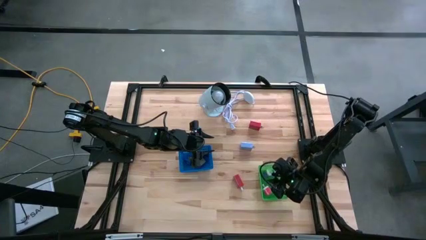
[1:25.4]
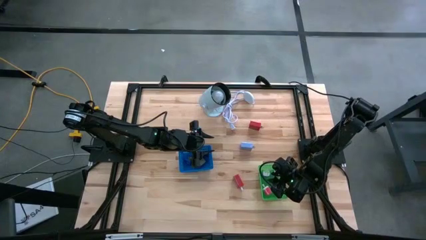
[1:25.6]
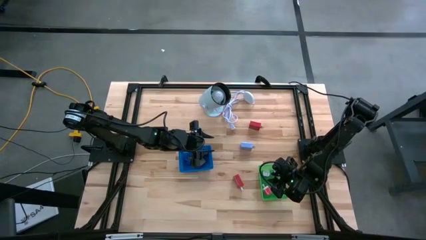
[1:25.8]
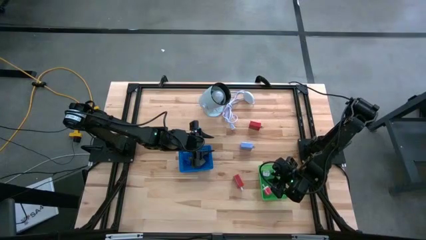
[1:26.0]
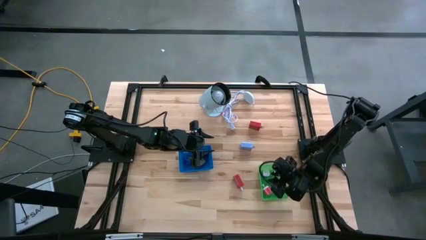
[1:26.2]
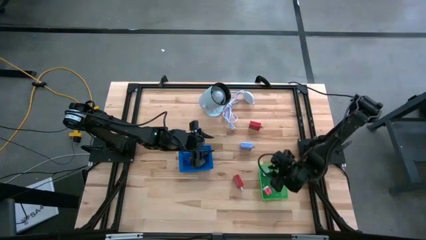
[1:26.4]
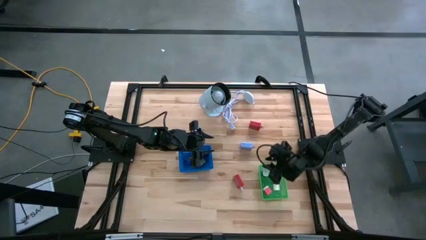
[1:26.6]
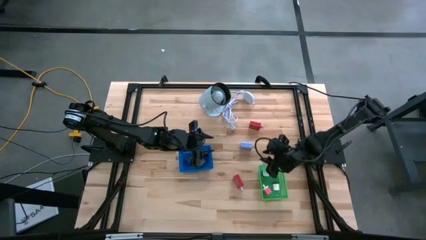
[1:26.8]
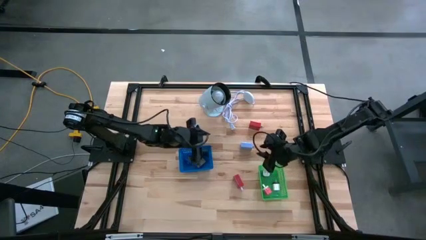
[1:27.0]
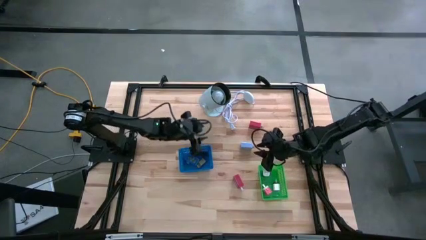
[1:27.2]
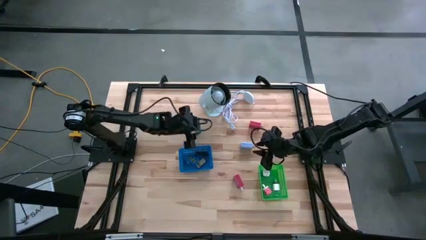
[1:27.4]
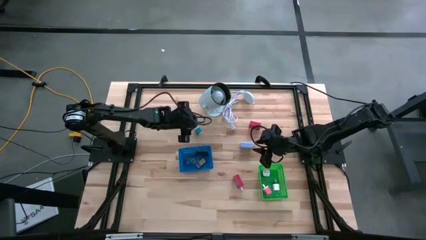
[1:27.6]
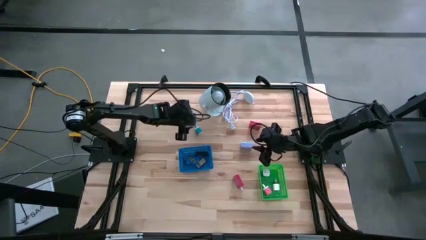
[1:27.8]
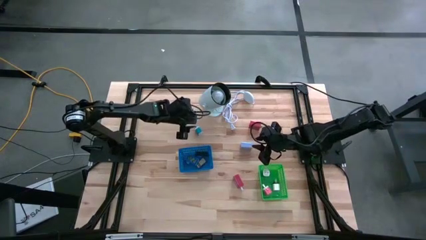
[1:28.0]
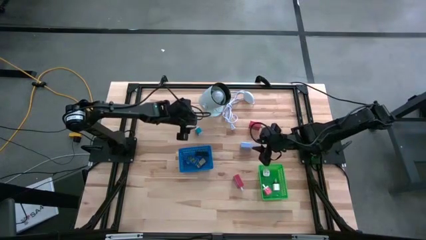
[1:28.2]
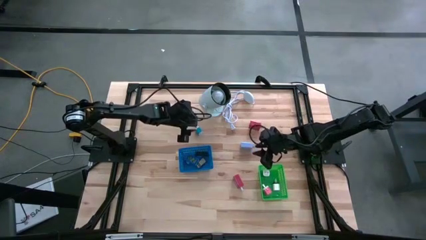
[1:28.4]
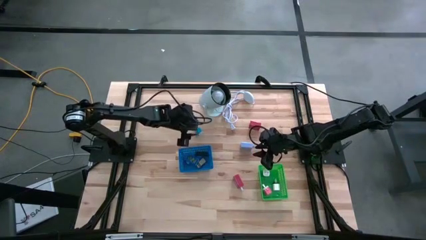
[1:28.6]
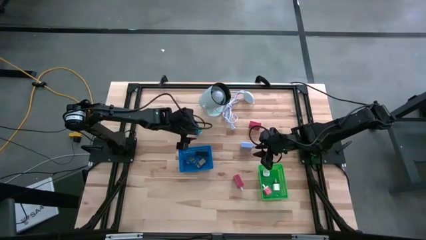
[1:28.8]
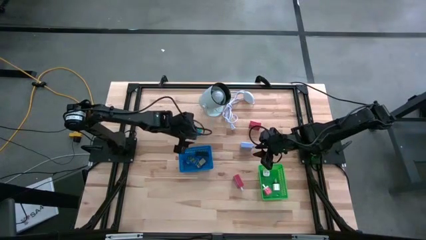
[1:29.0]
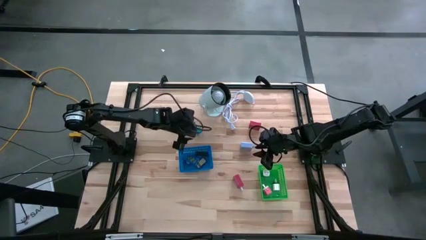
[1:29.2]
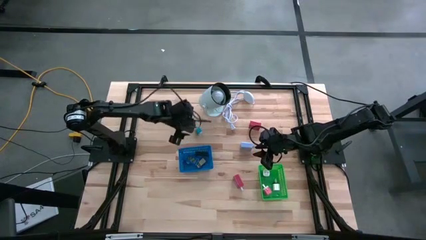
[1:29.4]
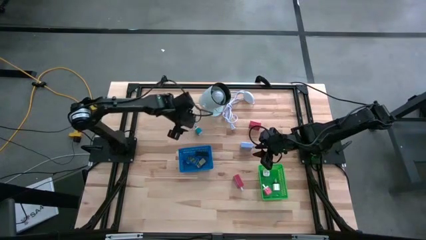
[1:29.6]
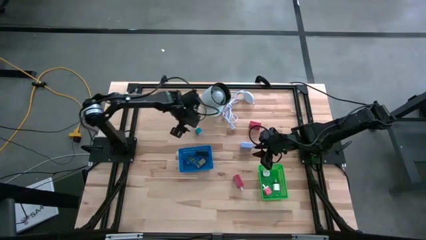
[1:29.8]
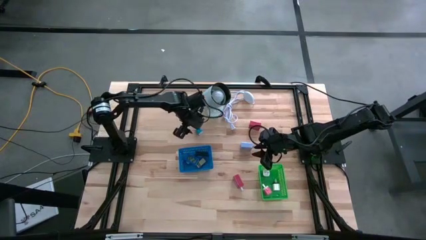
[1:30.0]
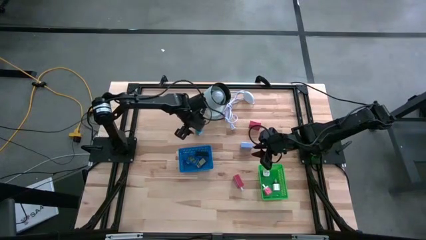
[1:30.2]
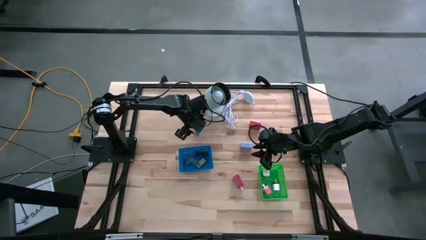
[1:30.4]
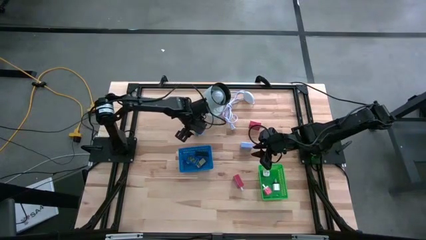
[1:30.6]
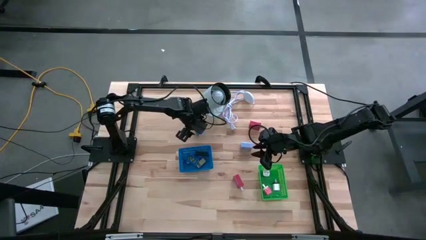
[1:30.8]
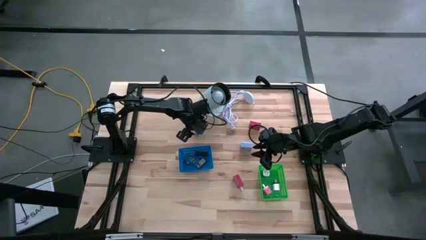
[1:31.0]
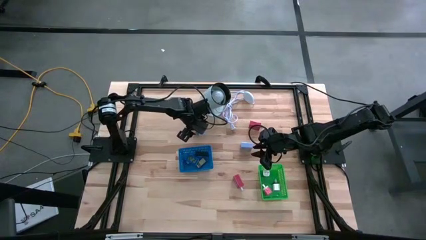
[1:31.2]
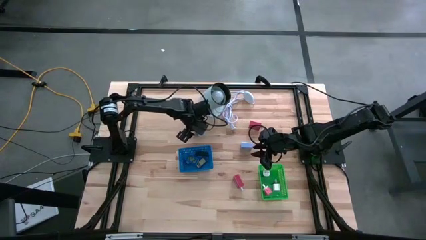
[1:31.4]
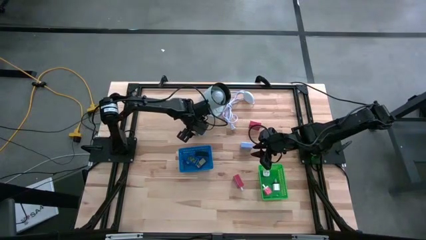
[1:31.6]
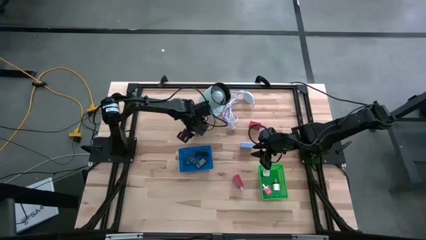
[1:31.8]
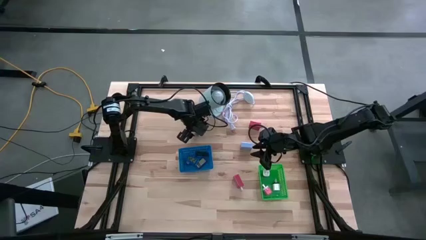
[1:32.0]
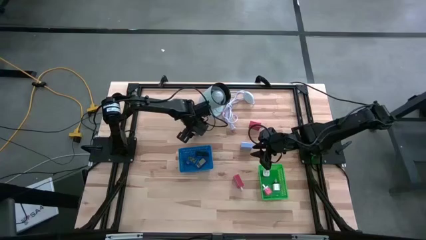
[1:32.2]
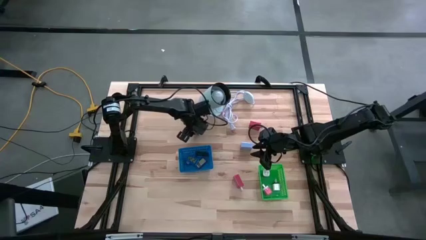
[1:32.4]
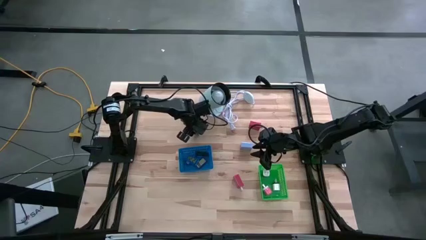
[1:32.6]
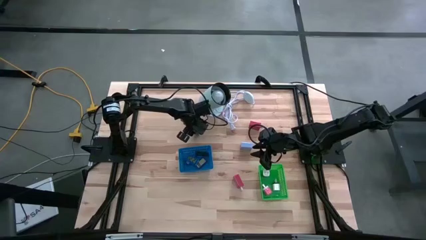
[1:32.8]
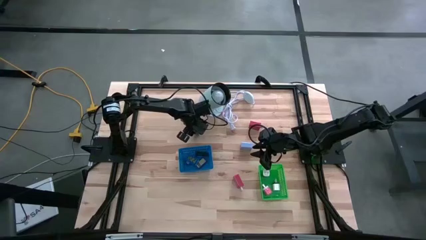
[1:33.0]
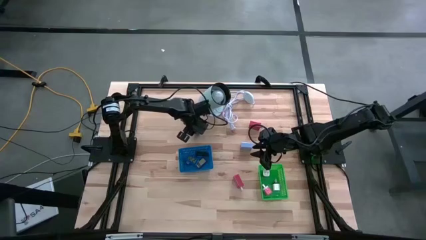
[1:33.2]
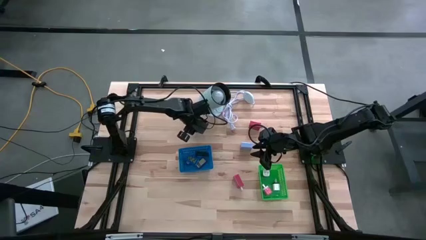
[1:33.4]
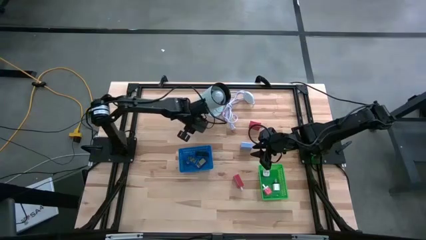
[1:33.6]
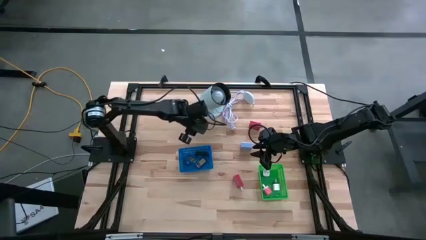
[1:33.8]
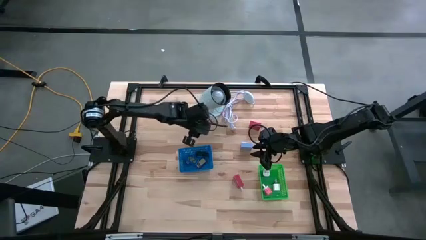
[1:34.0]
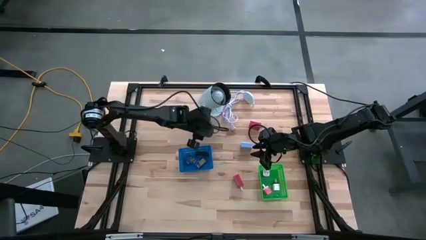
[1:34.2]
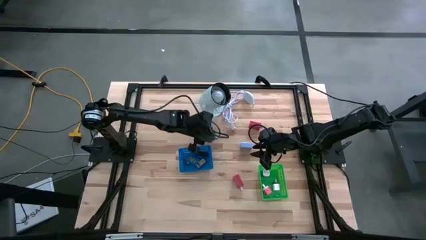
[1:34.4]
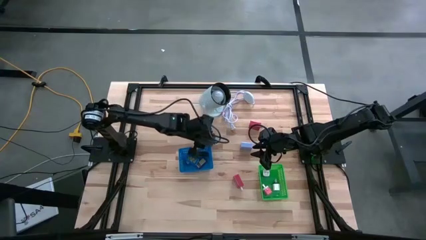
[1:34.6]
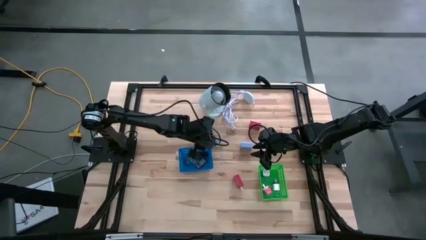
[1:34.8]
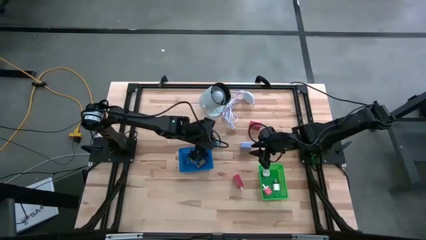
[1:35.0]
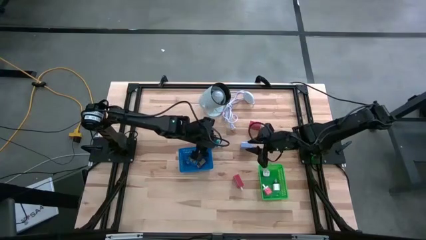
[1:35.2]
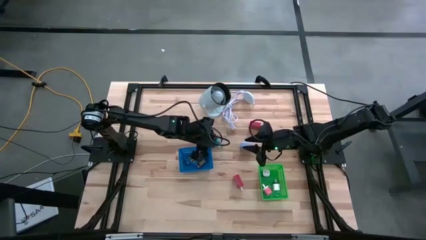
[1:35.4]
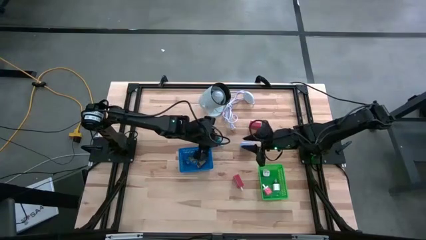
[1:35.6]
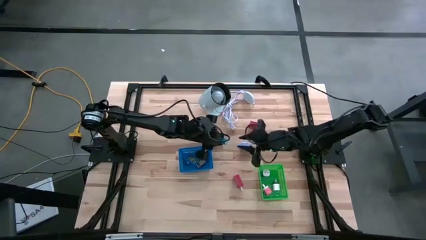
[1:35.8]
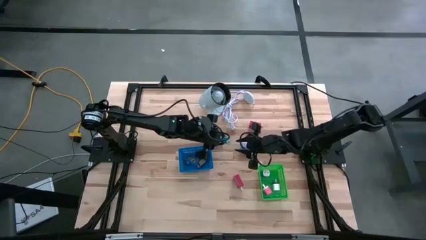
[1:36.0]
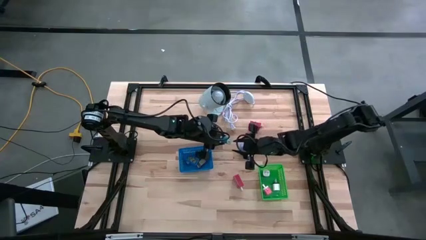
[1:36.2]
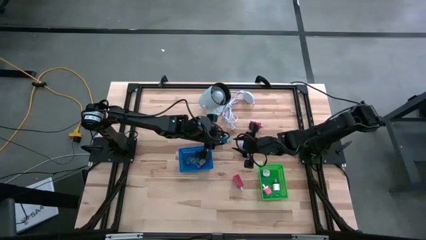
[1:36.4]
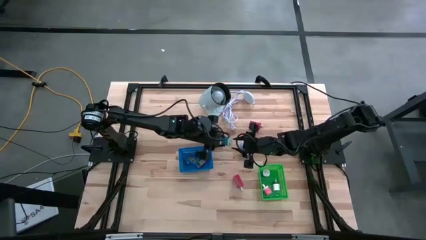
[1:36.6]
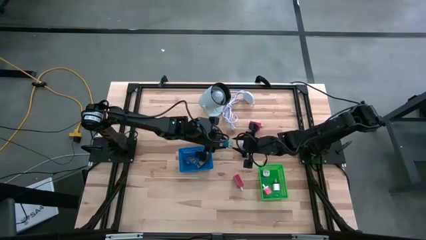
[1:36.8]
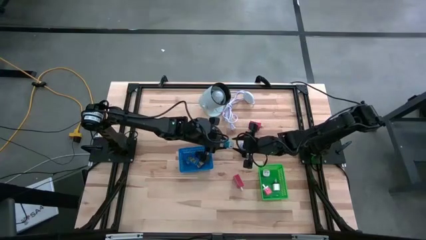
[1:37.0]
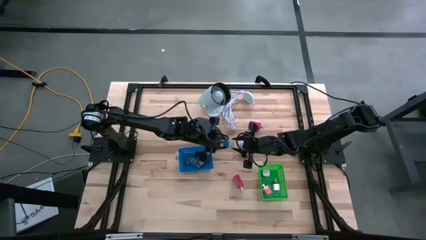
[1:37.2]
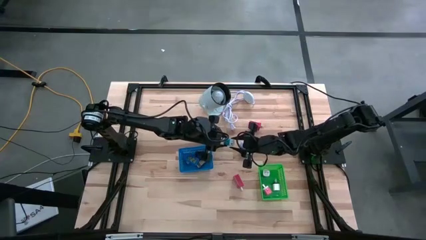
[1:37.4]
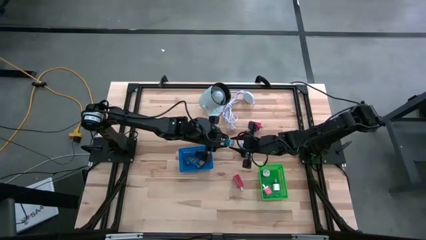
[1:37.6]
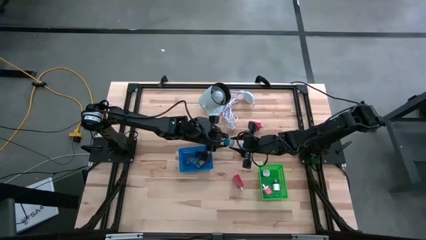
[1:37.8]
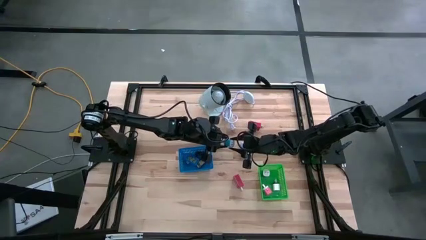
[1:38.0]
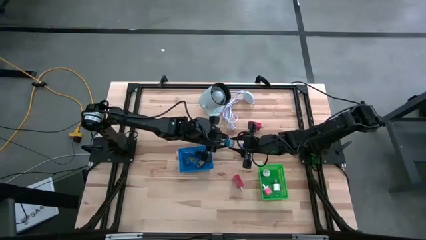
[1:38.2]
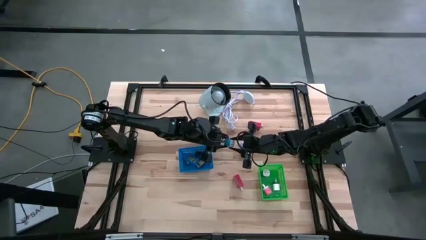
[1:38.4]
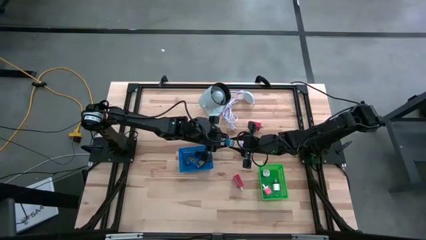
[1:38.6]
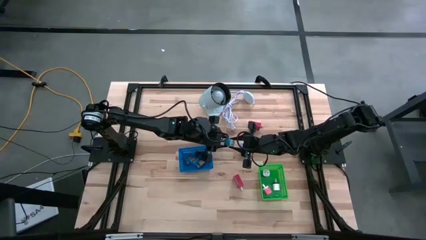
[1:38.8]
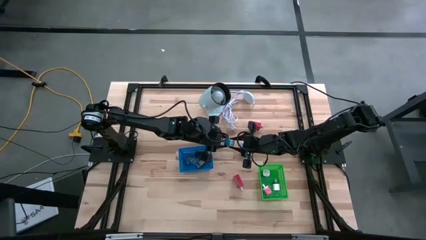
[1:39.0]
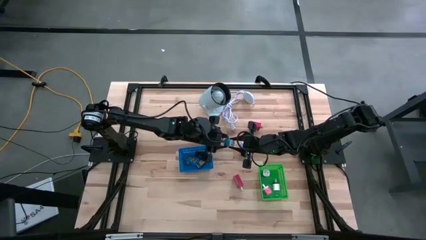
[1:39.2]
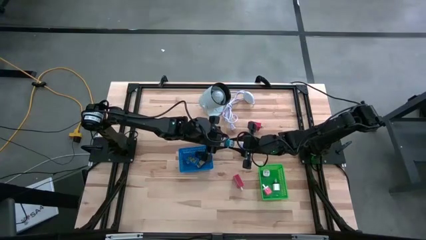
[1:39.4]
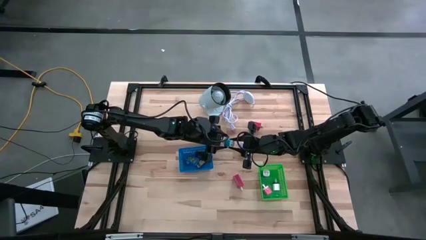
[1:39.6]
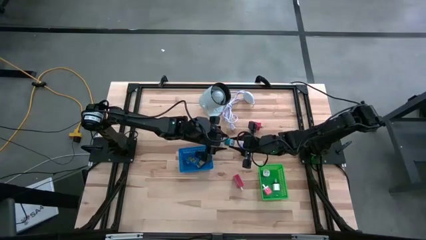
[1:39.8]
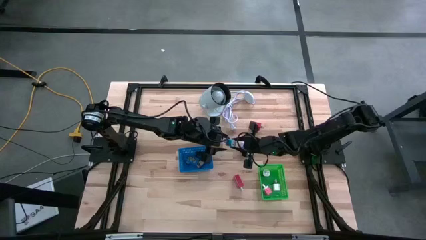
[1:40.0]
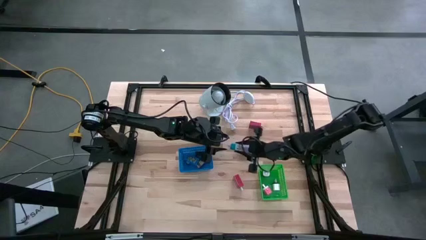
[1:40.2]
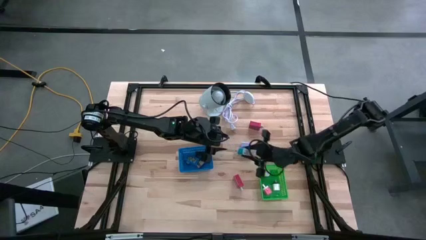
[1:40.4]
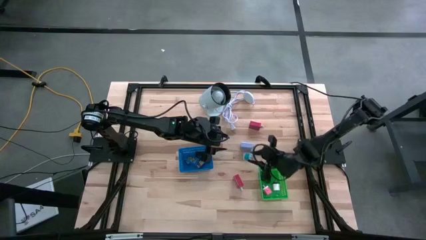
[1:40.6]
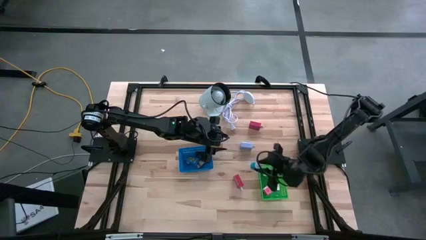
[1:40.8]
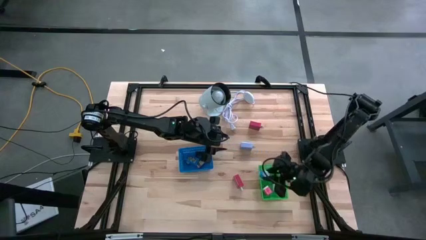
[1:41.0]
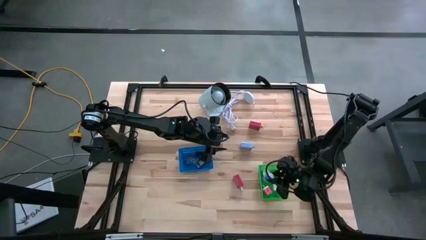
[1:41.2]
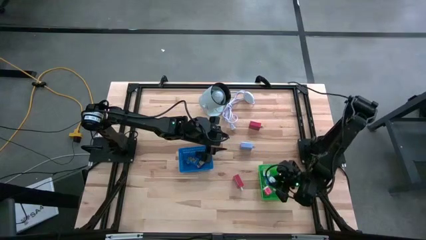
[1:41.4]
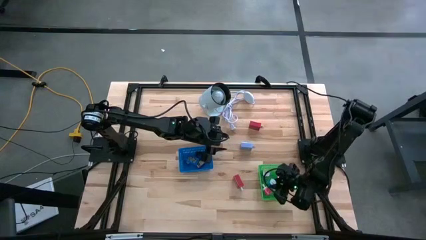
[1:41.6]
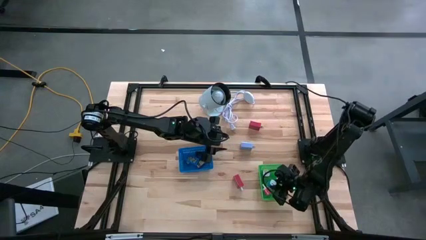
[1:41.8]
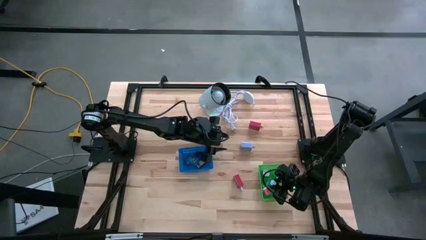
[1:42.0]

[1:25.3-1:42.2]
Task: Pick & Place Office items
Put the blue charger adapter into the green bin
